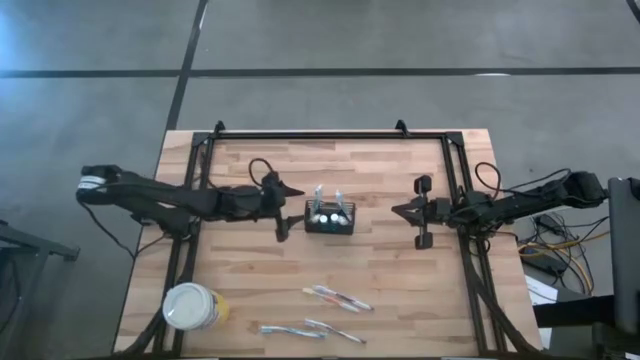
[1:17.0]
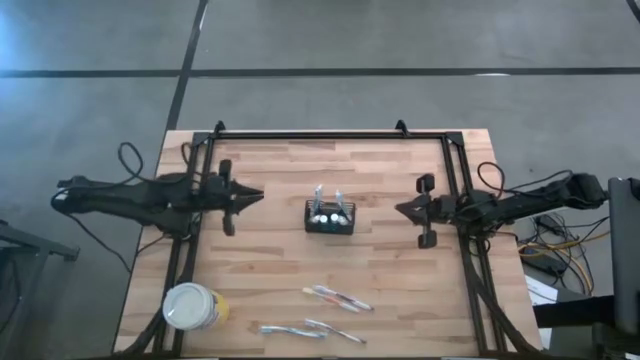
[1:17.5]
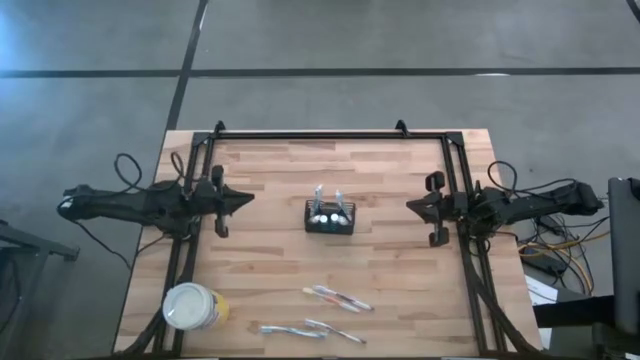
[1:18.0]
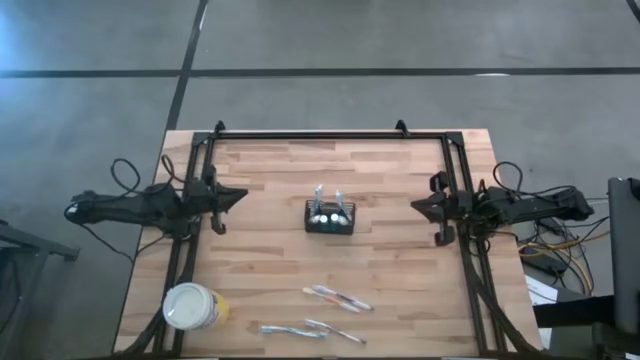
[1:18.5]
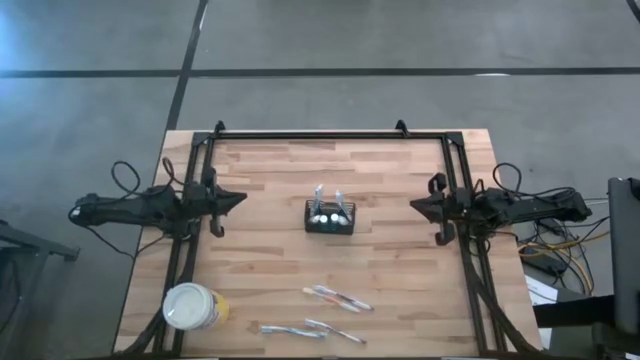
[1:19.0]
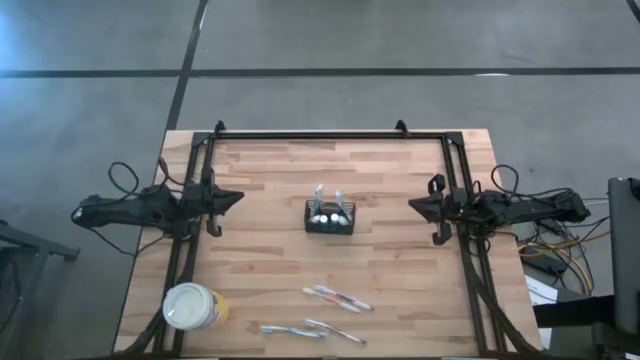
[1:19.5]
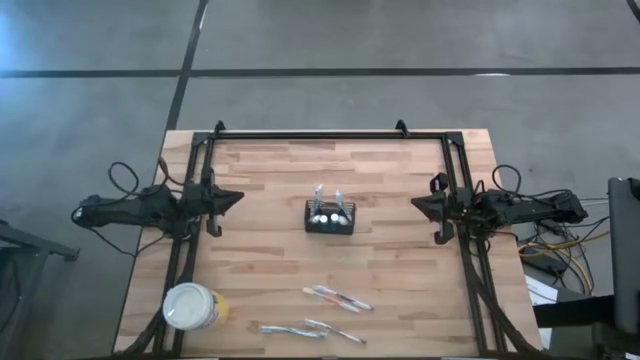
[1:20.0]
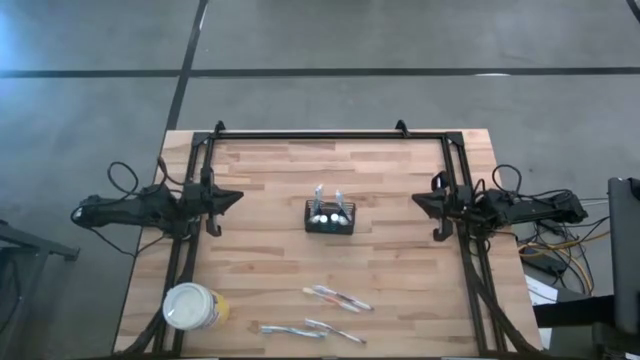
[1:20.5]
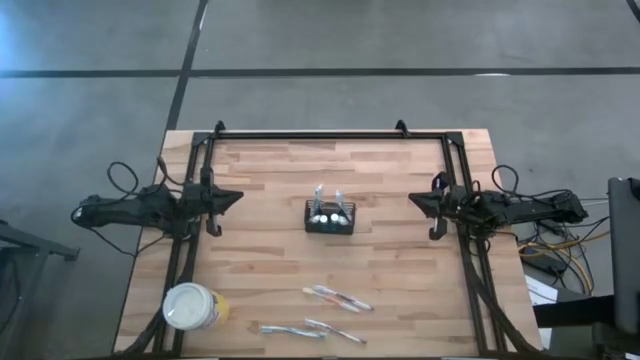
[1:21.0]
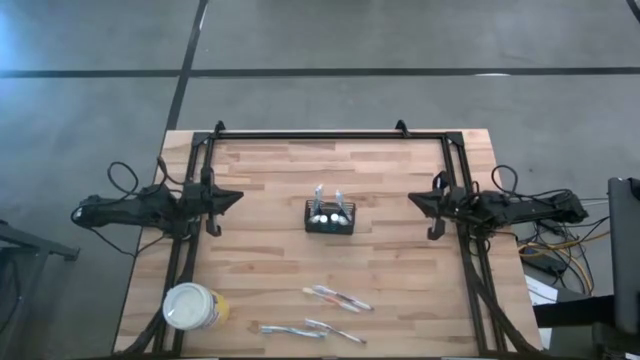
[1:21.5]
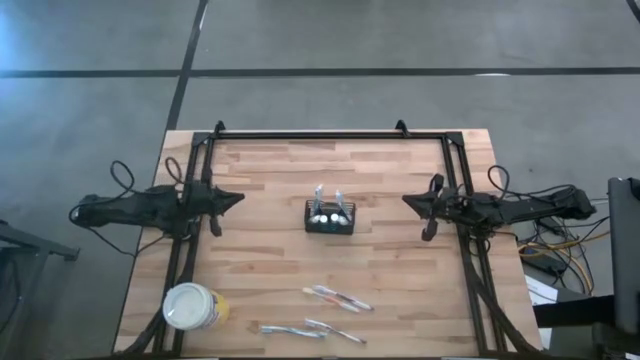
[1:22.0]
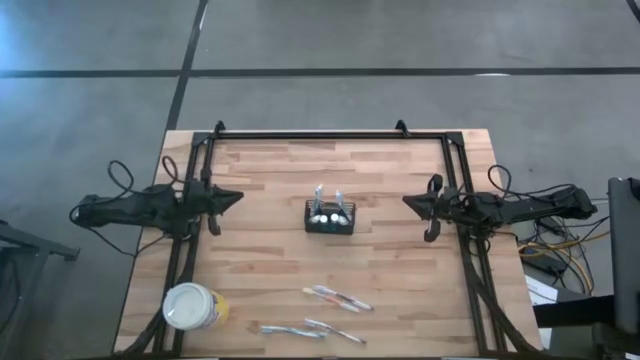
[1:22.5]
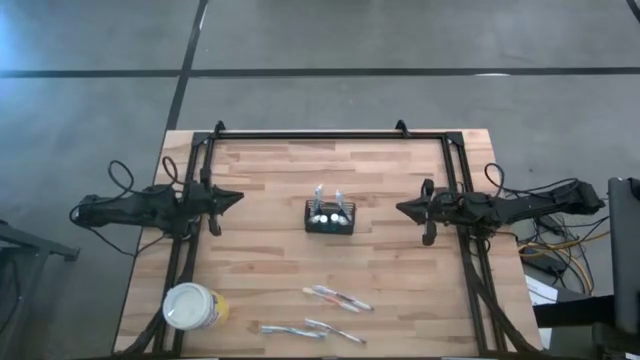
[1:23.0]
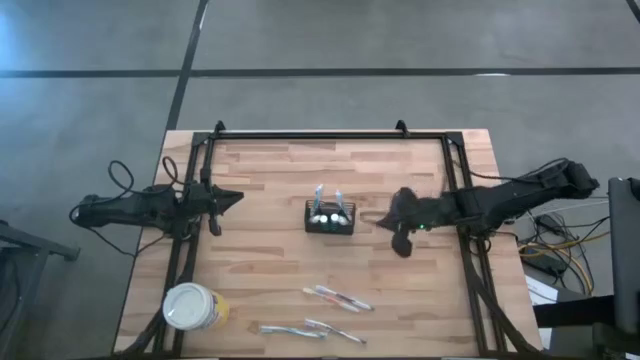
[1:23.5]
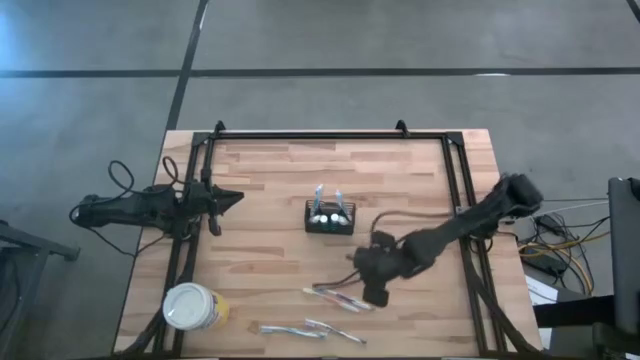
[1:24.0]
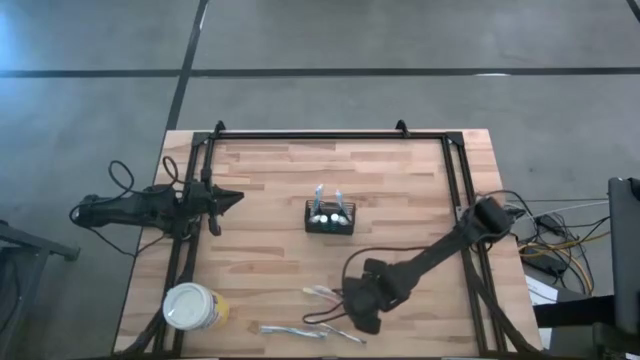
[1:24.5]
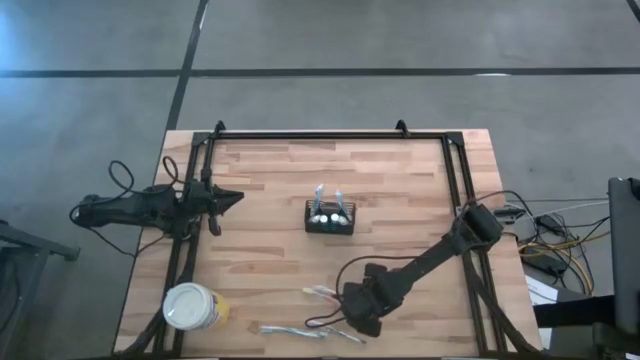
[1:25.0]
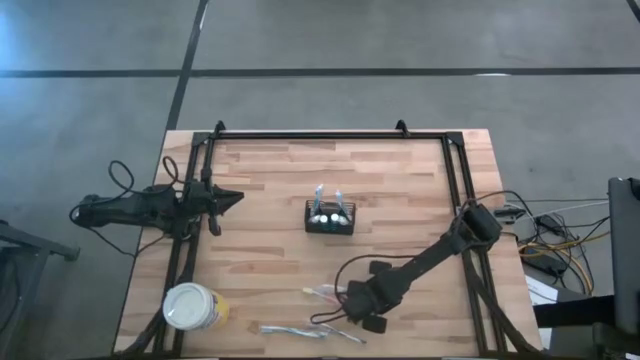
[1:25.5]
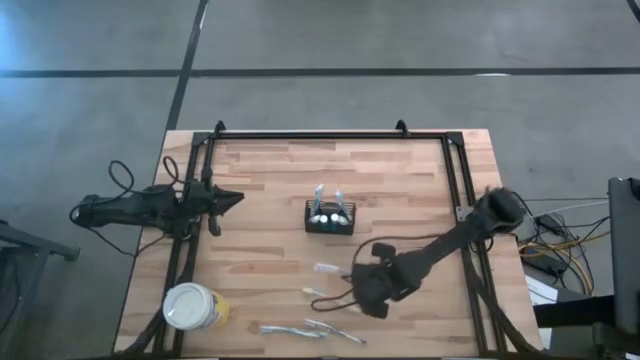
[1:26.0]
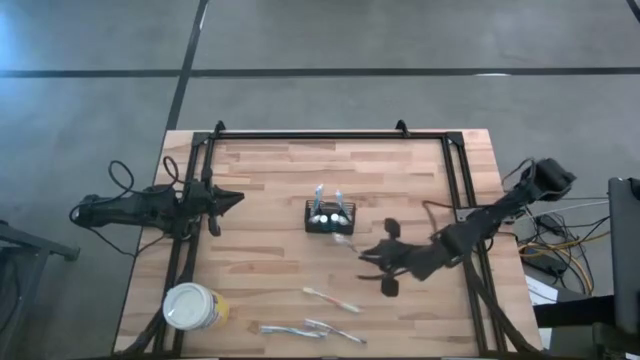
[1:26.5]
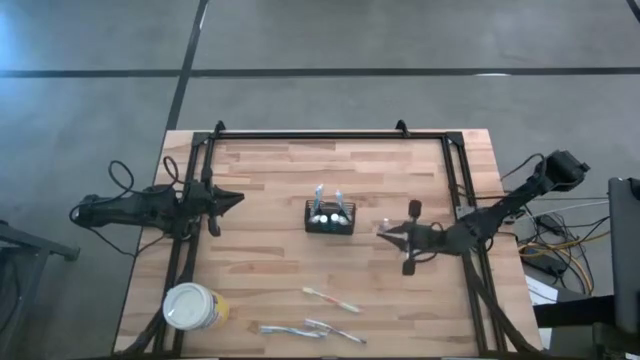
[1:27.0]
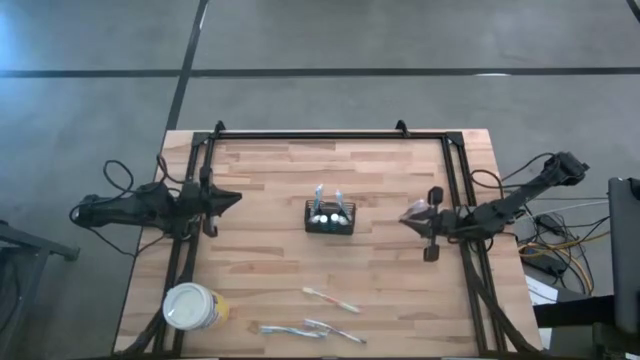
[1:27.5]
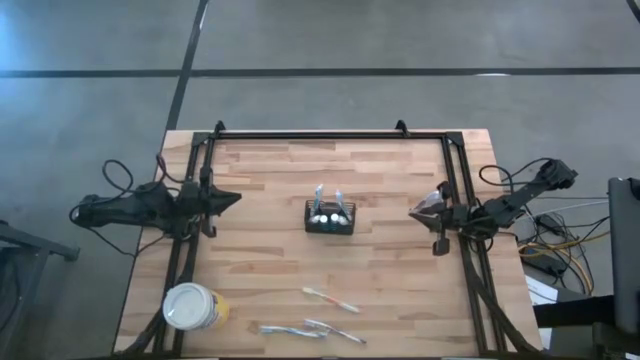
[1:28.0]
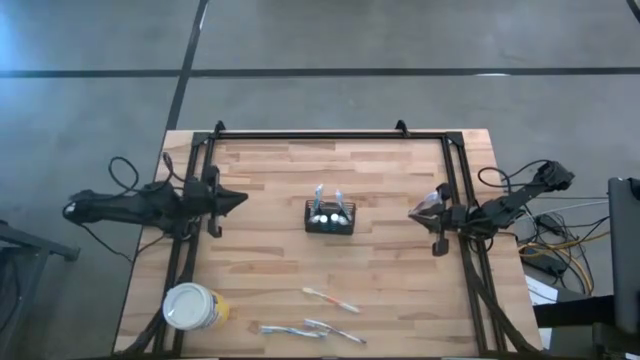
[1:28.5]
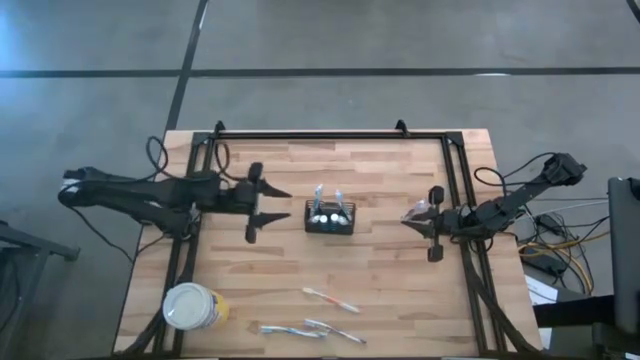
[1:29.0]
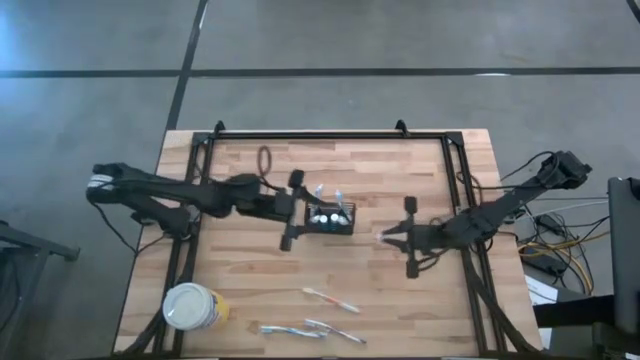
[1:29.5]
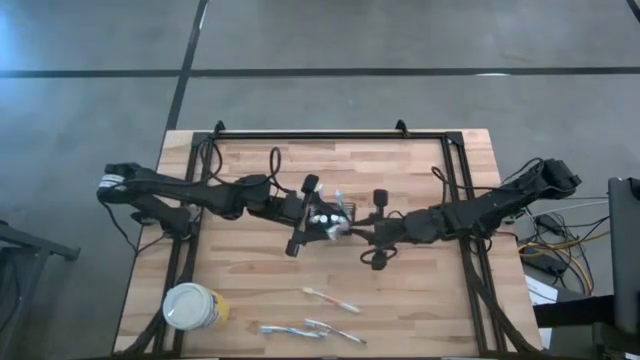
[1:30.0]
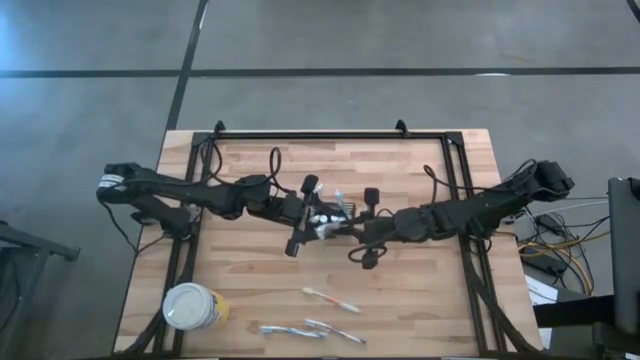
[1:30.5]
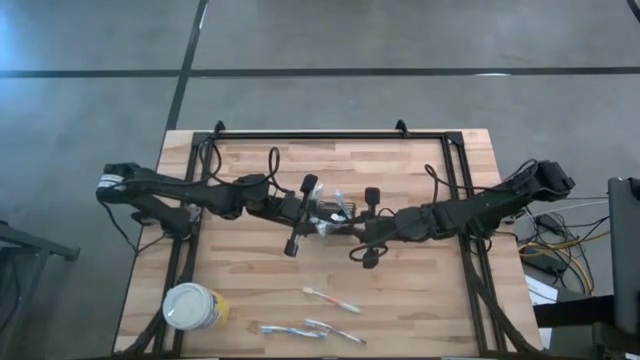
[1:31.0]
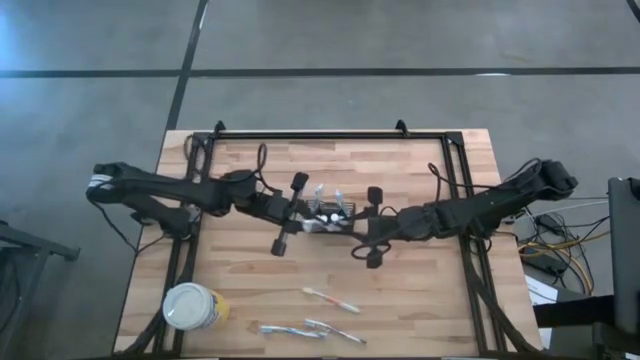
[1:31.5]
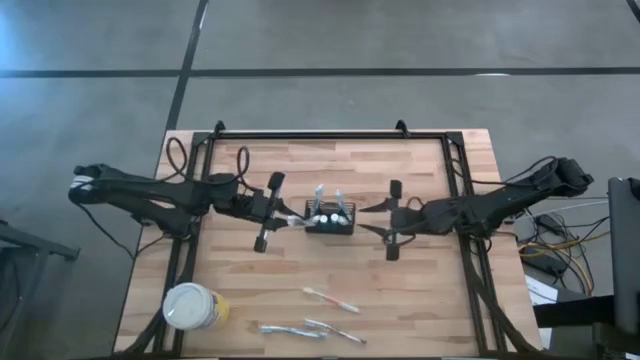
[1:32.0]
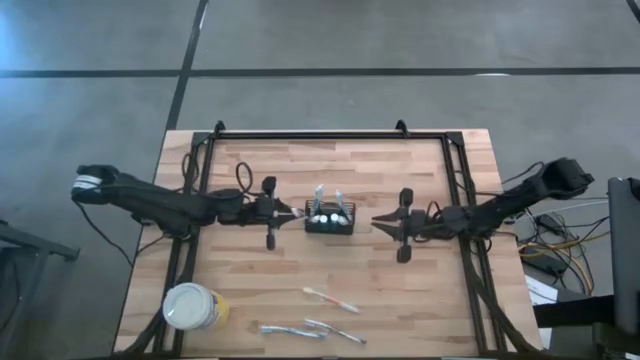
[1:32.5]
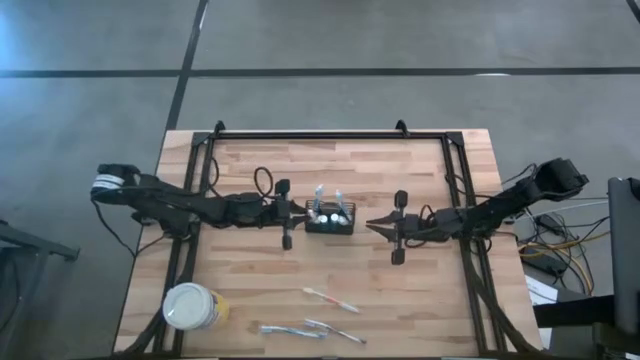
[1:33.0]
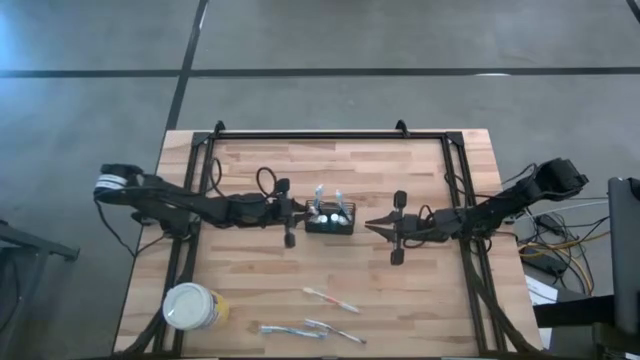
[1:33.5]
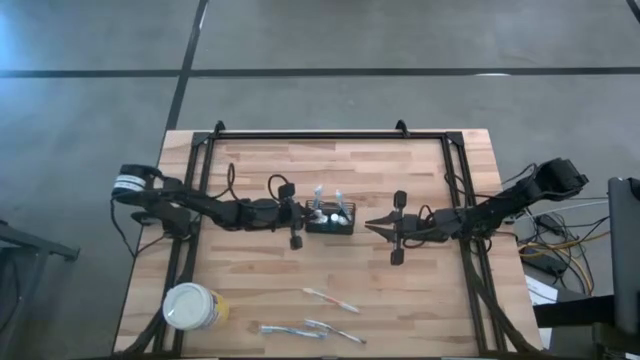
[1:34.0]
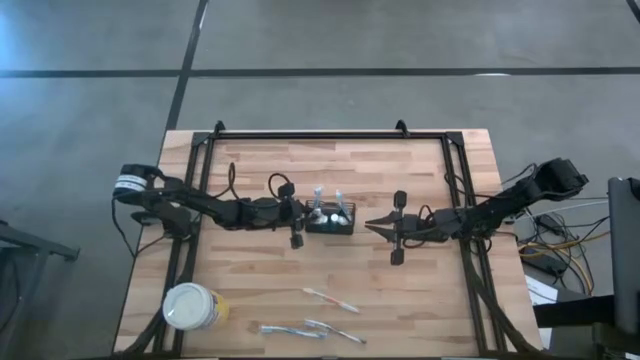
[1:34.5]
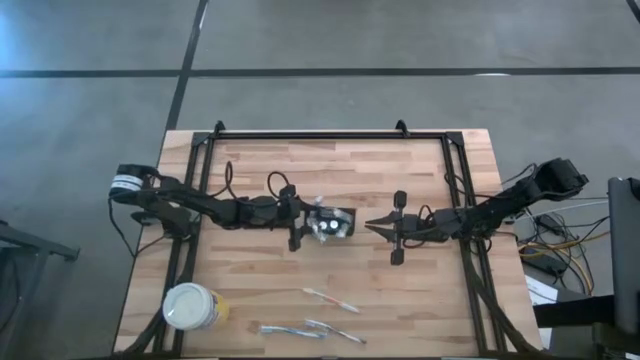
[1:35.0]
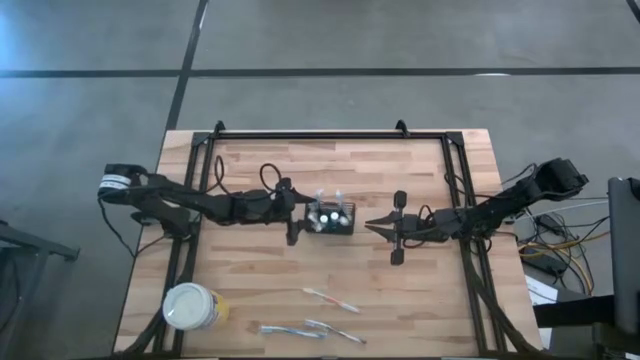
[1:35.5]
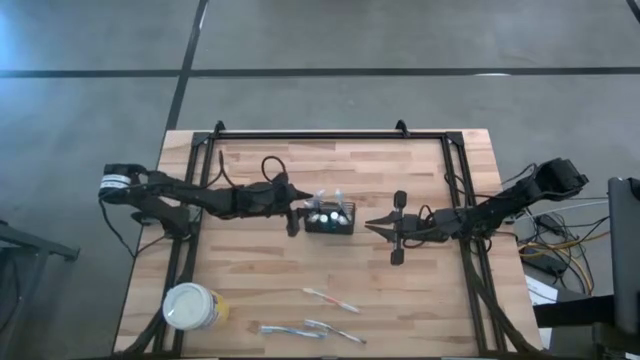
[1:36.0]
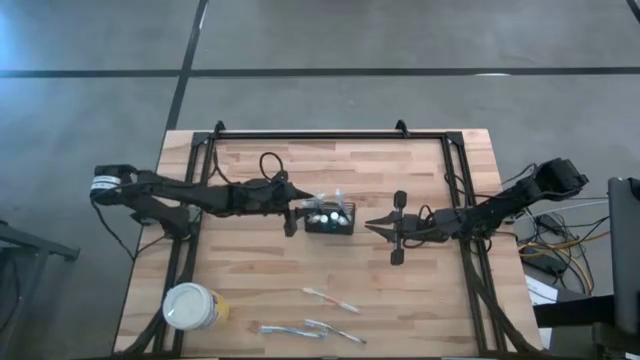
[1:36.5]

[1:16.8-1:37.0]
Task: Pick & Place toothbrushing station
Put the top purple toothbrush into the wire organizer

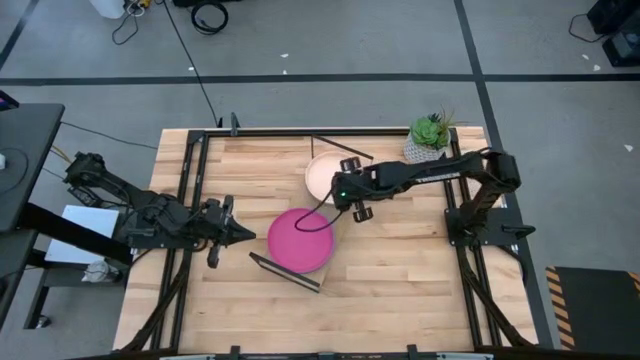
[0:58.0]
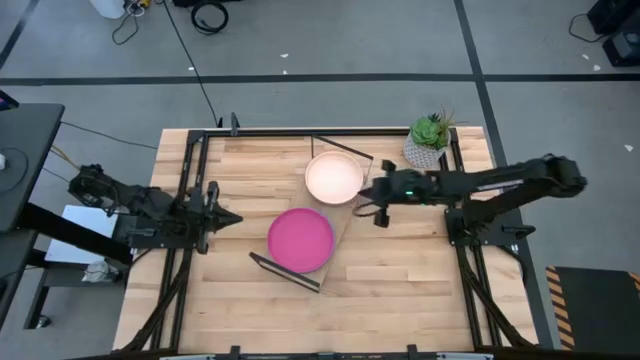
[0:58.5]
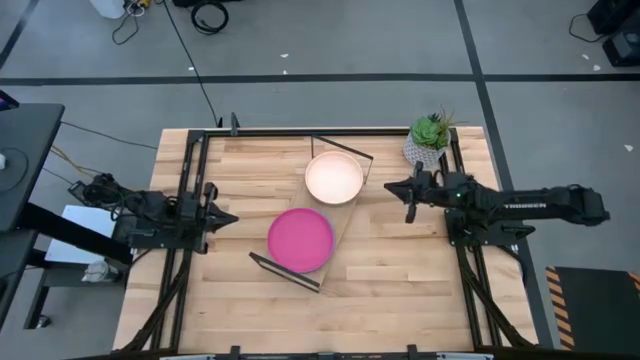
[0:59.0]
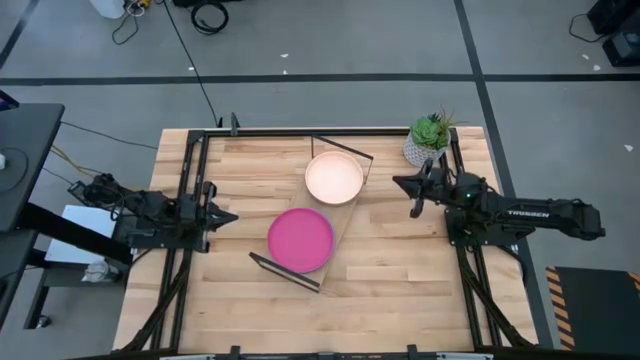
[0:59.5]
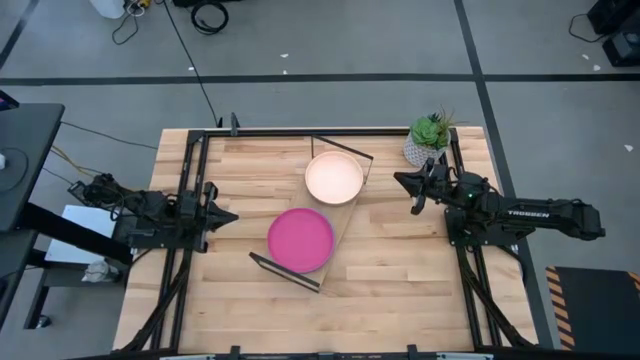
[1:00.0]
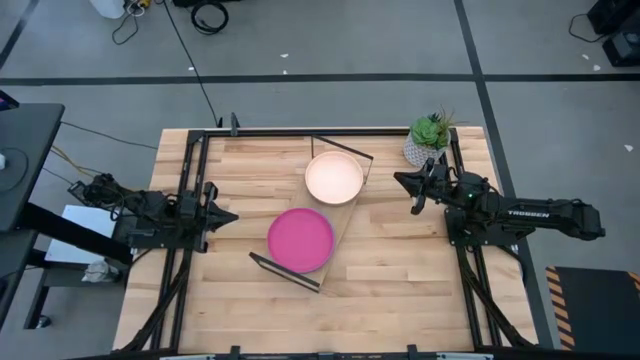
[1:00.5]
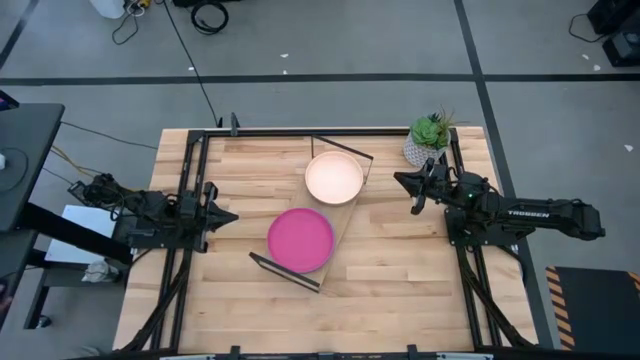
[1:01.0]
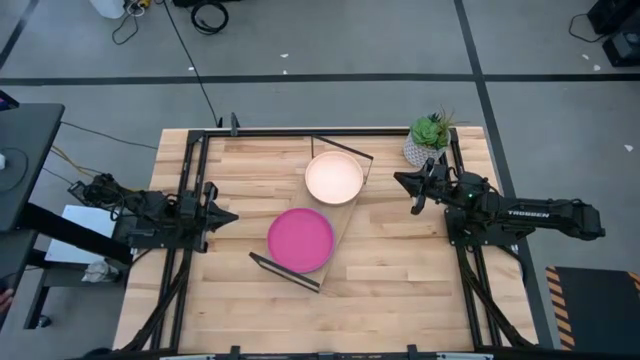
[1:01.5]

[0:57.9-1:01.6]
Task: Place and stack plates onto a shelf
Return to Home Position
